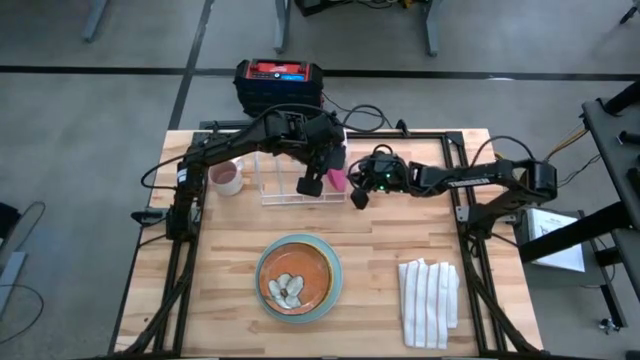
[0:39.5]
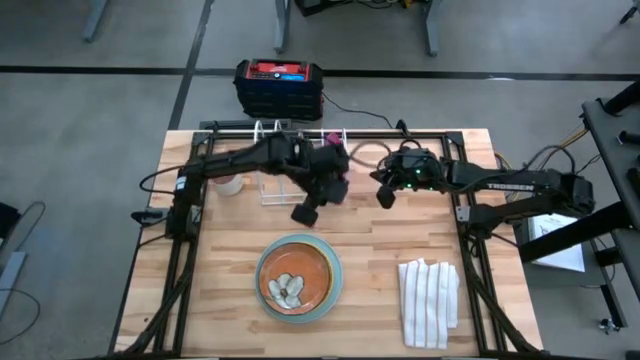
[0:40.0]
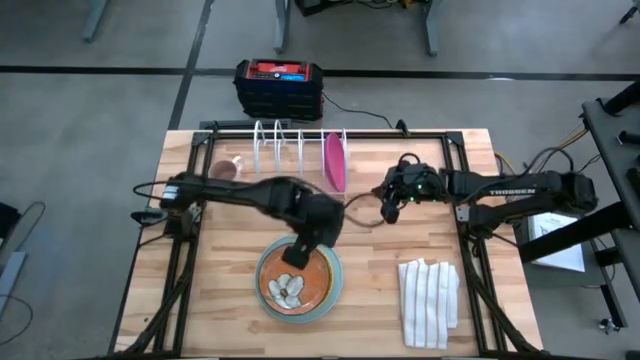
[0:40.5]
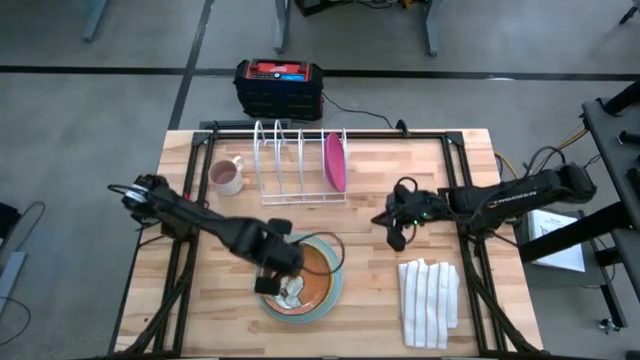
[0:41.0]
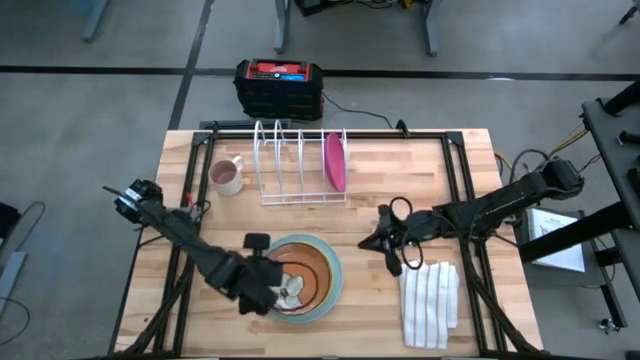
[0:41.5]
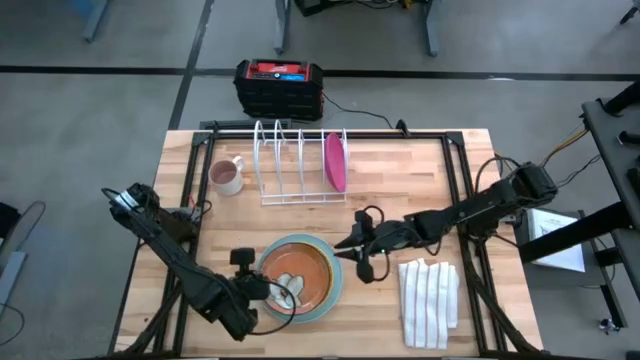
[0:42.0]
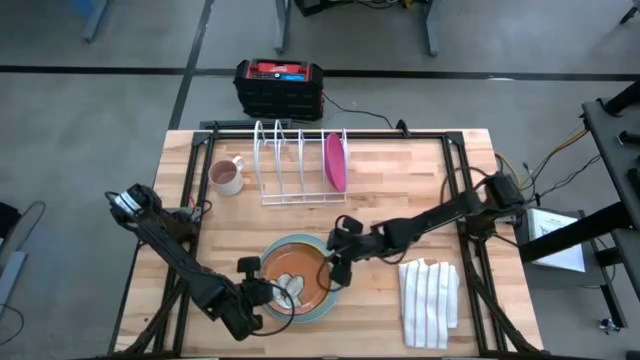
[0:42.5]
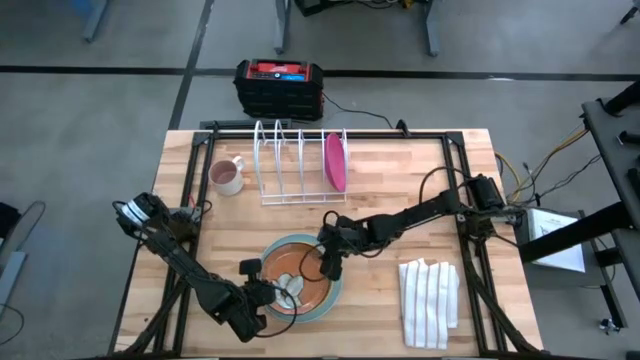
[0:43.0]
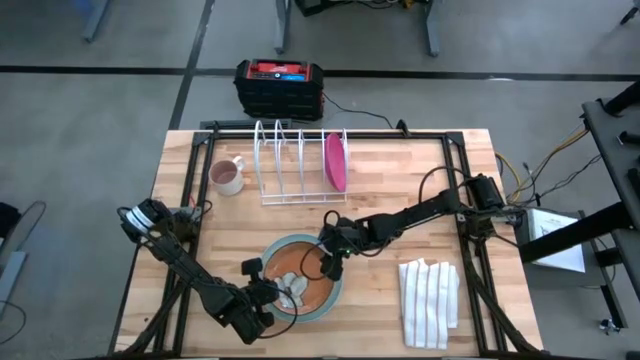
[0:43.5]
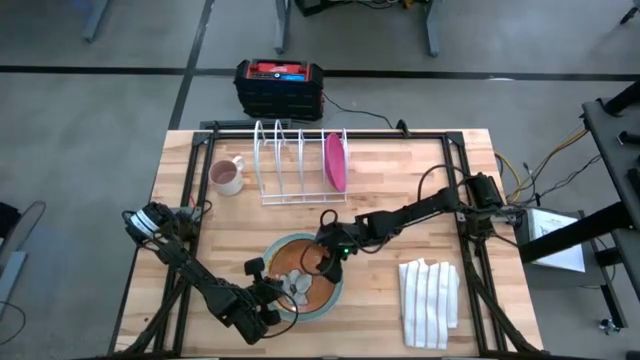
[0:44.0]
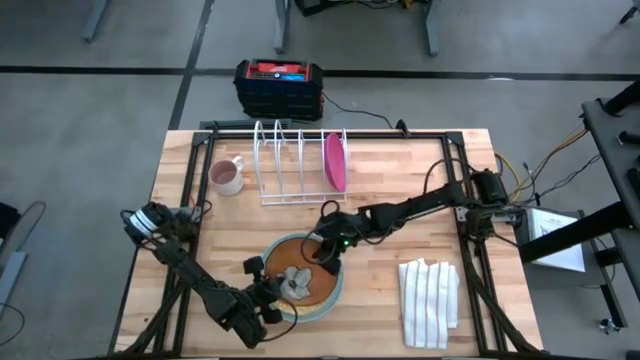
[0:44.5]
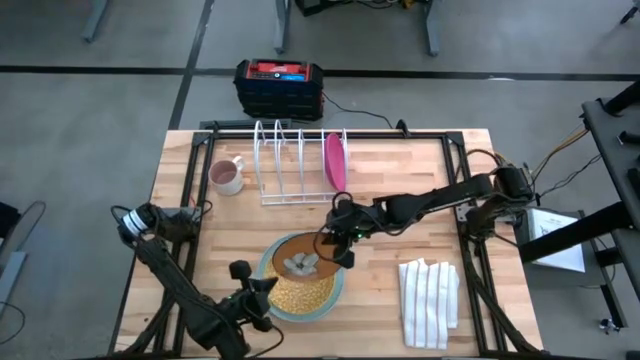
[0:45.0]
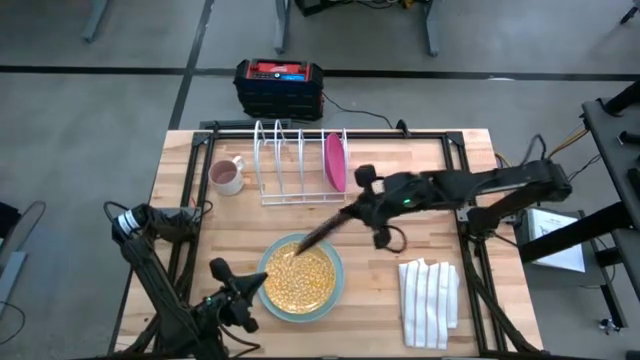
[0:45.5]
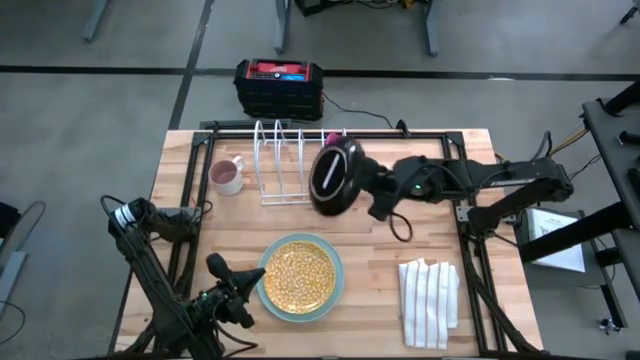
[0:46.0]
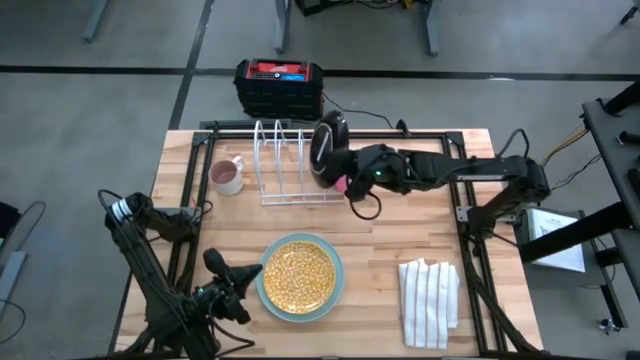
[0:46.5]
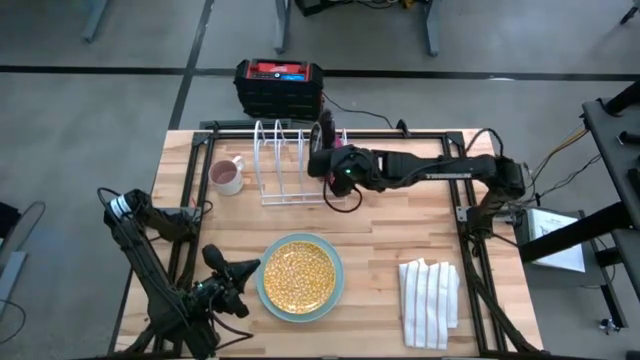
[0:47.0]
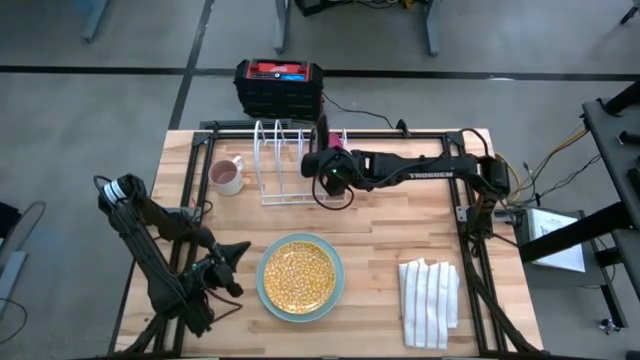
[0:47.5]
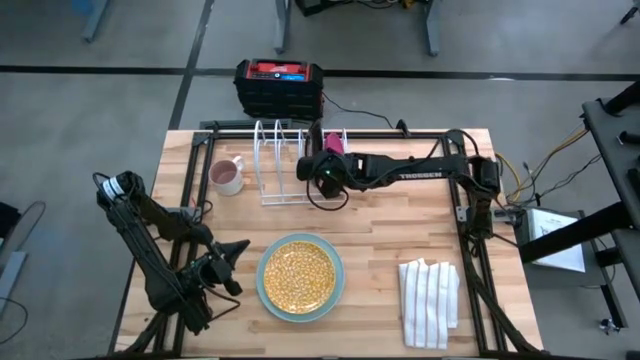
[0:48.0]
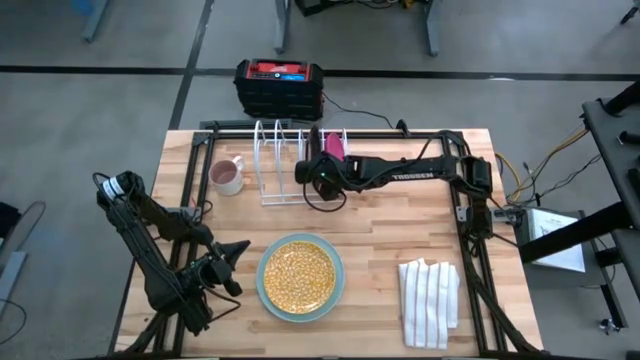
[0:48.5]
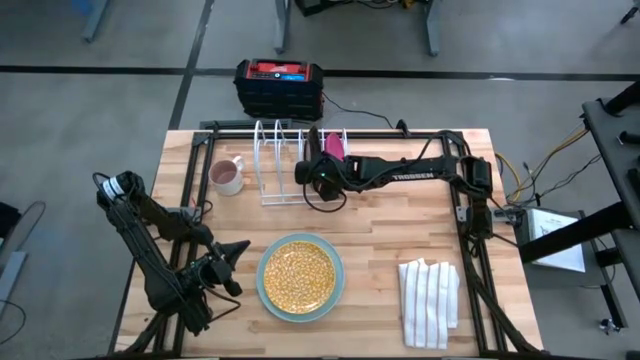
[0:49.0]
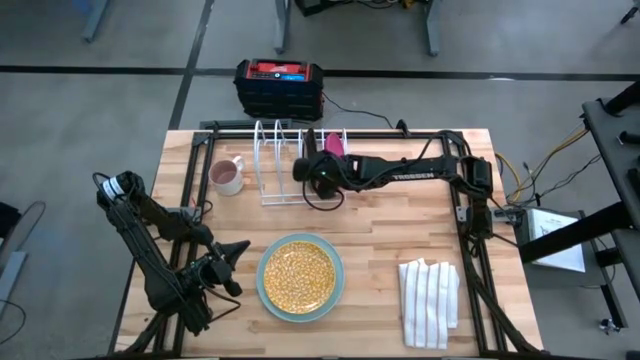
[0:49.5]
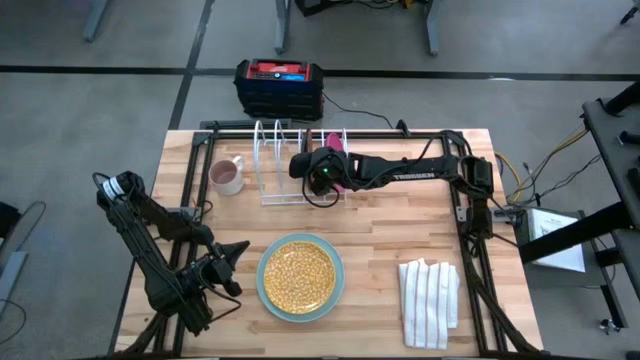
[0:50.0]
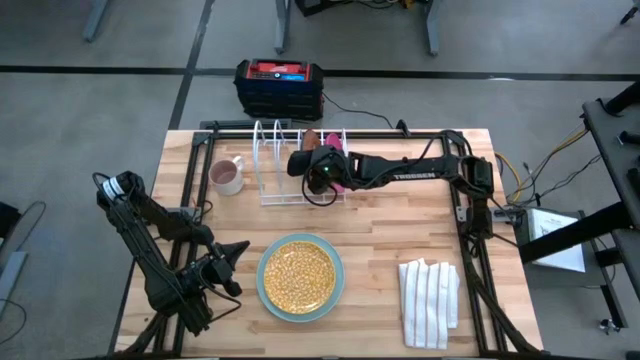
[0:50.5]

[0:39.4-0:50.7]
Task: Sort dishes
Put the brown plate into the dish rack

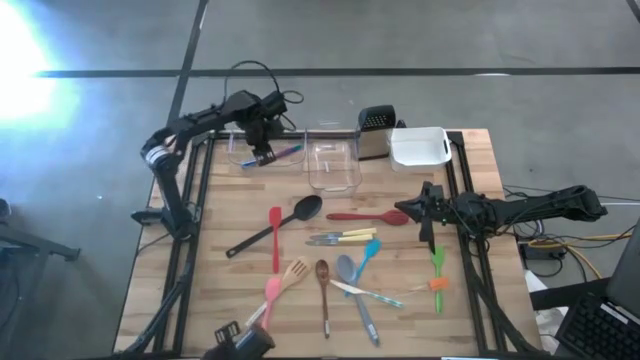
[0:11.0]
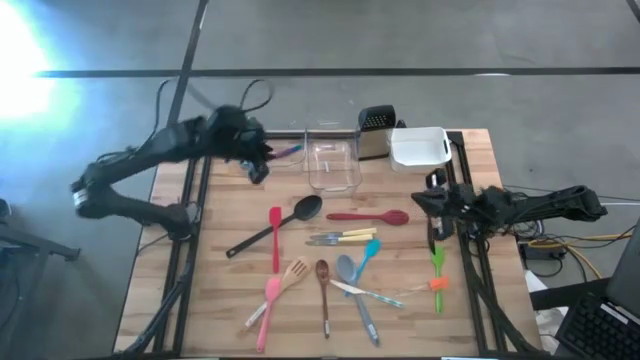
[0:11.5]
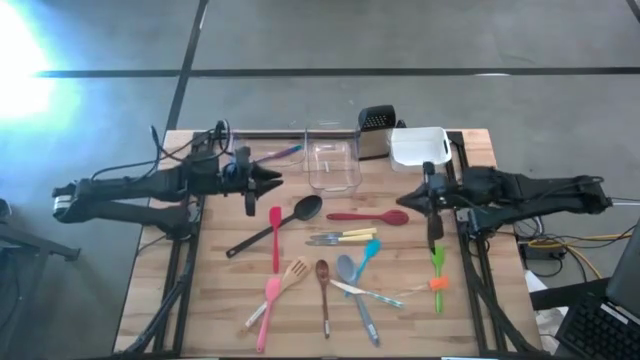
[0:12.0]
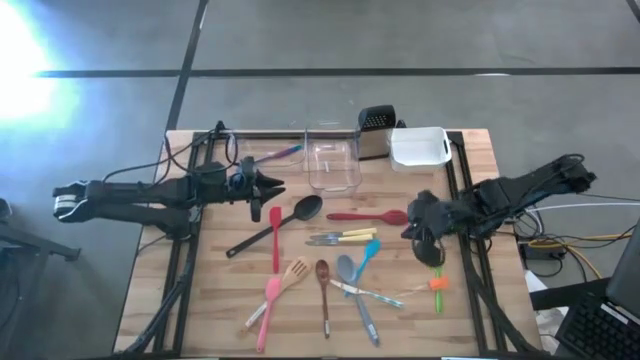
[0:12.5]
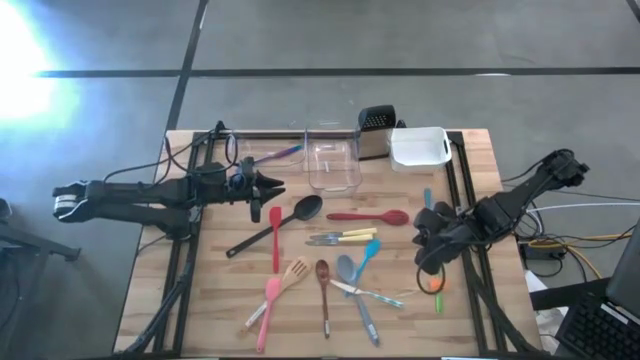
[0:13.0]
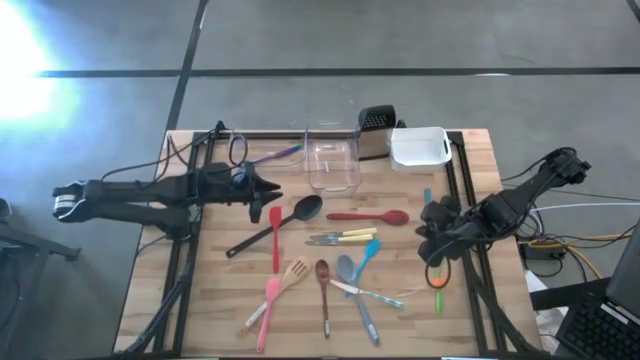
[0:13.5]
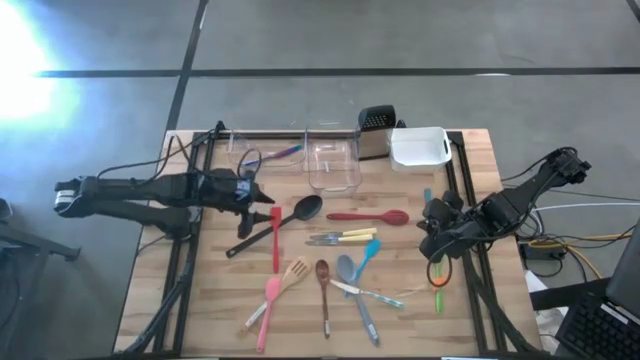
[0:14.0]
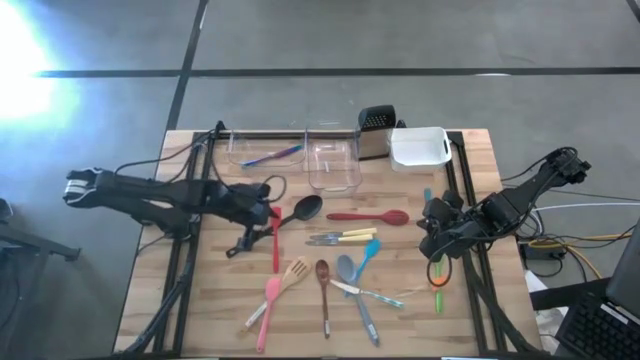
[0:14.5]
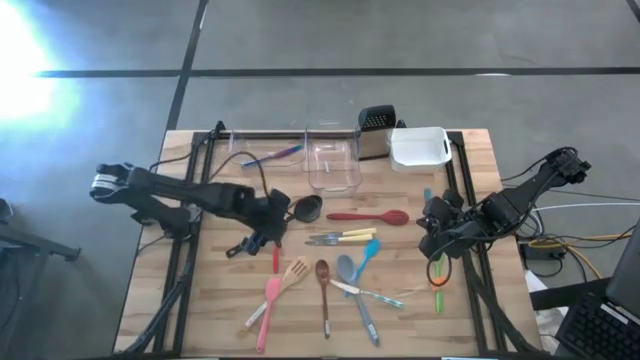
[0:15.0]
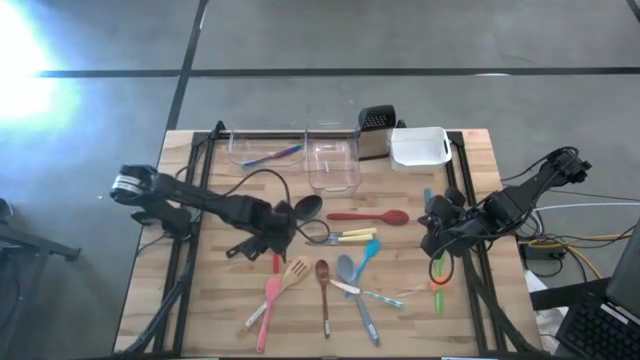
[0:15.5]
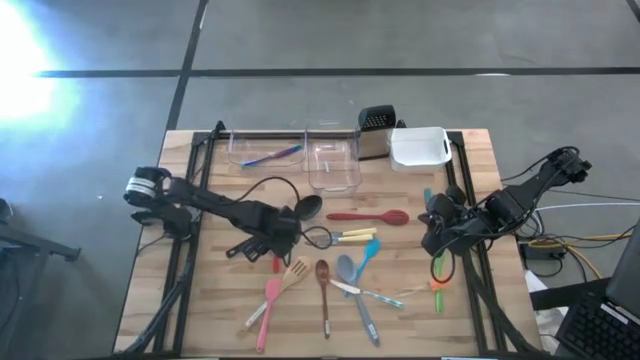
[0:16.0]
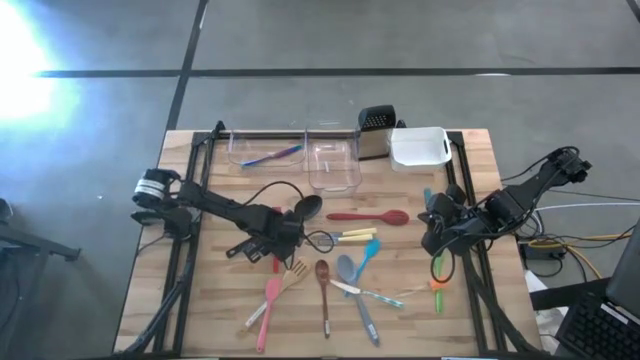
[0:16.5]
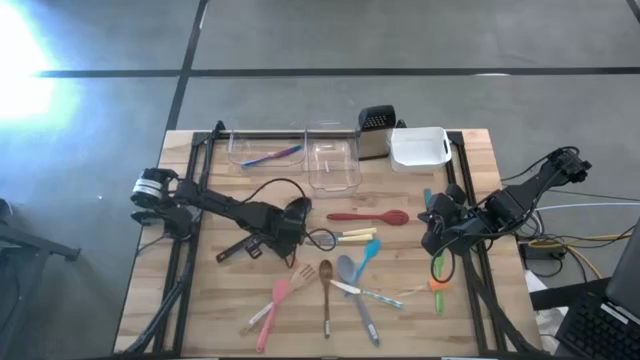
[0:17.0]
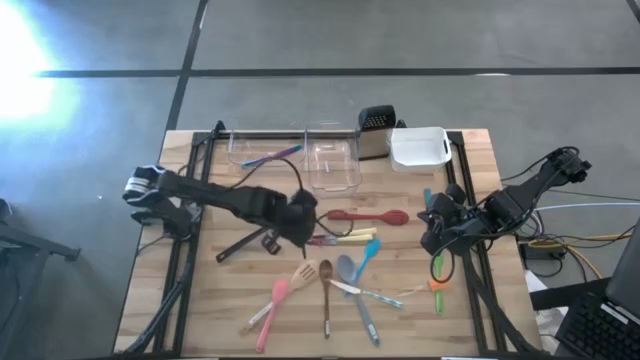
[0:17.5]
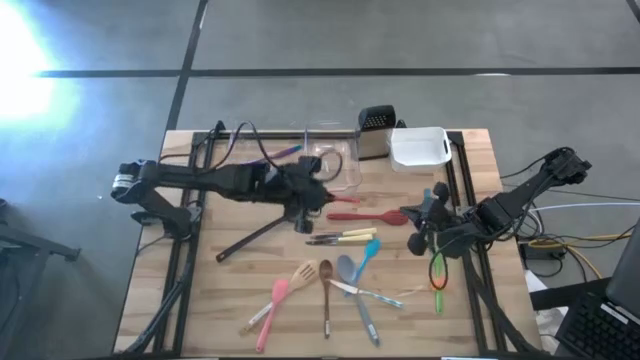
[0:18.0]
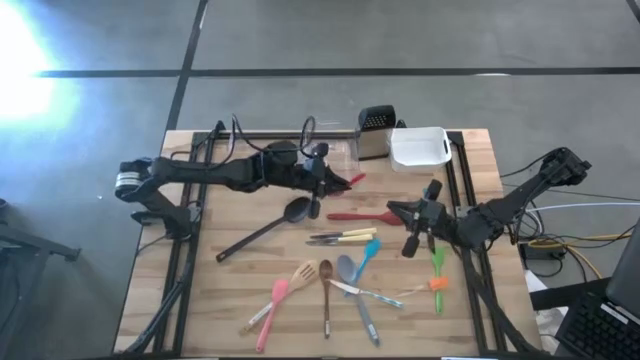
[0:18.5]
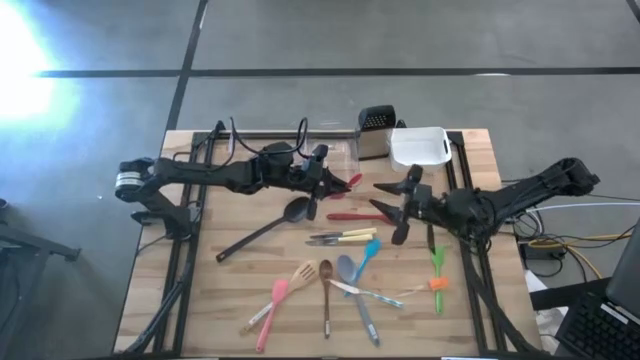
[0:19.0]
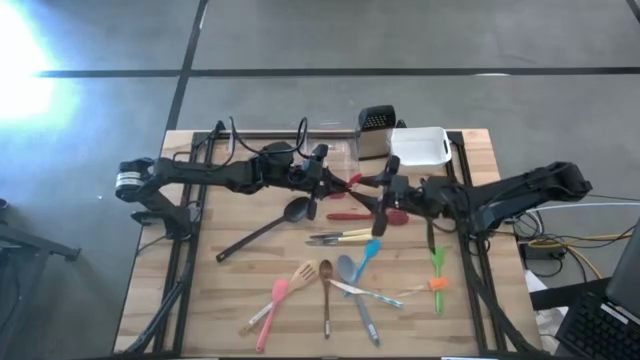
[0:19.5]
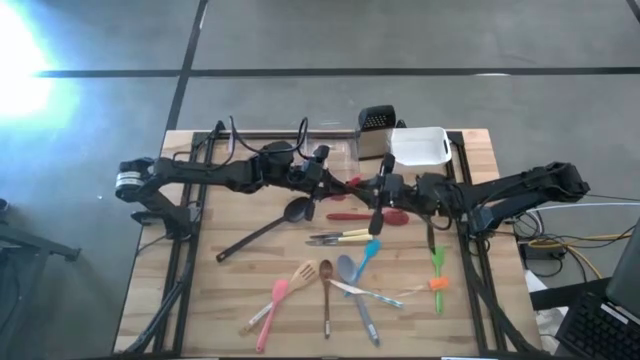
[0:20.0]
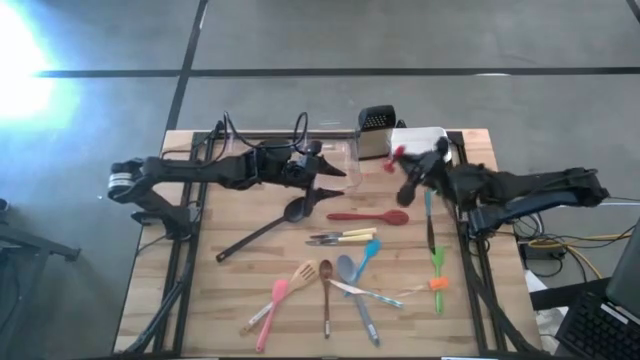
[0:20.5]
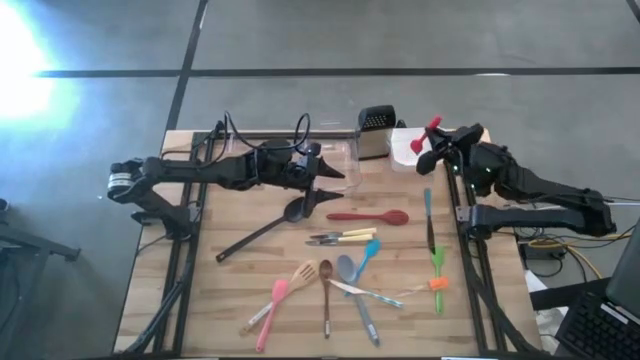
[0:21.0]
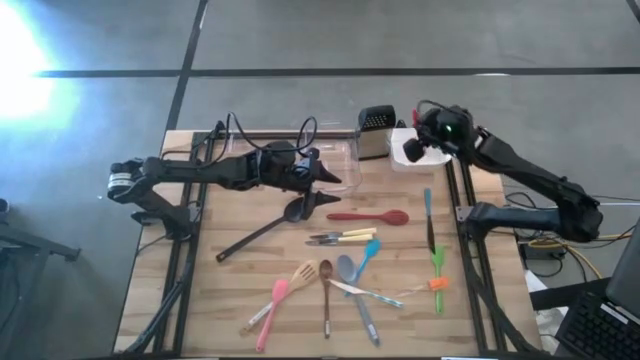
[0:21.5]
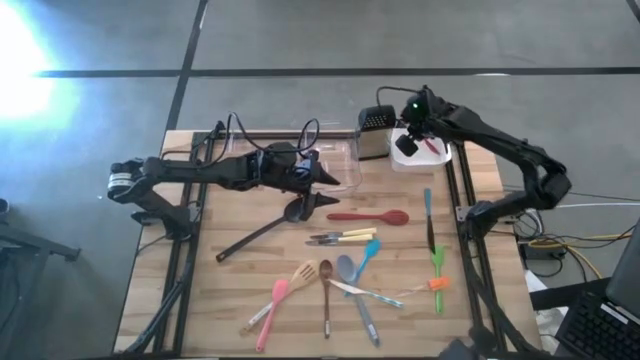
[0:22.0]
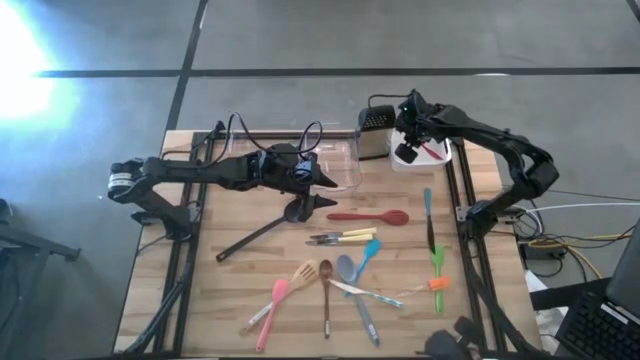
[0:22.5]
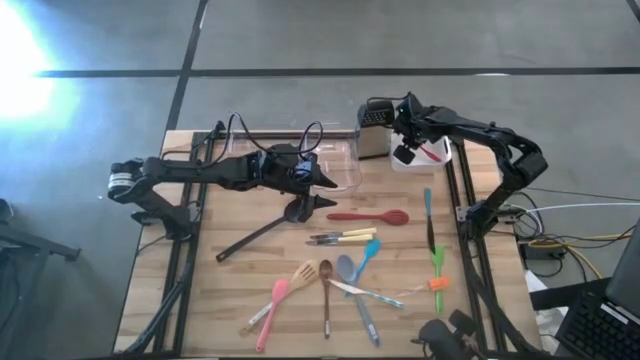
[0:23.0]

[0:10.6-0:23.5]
Task: Pick & Place Kitchen Items
Put the red spatula into the white bin
